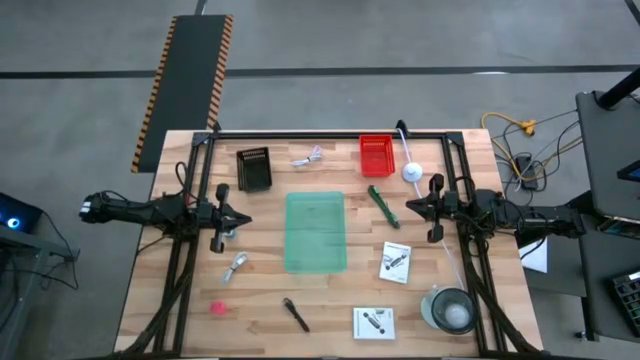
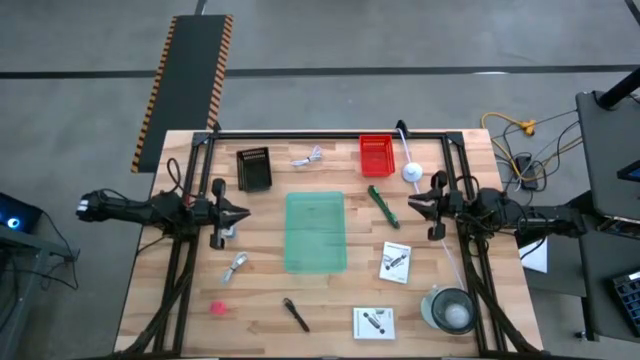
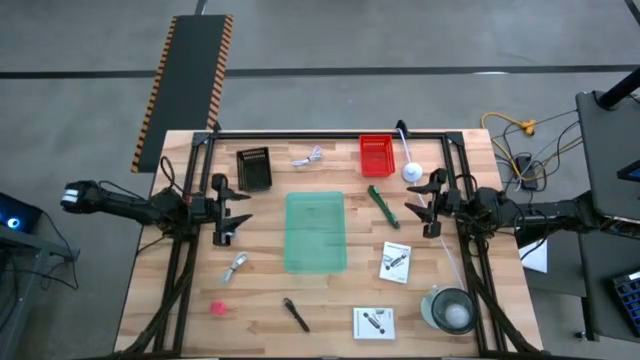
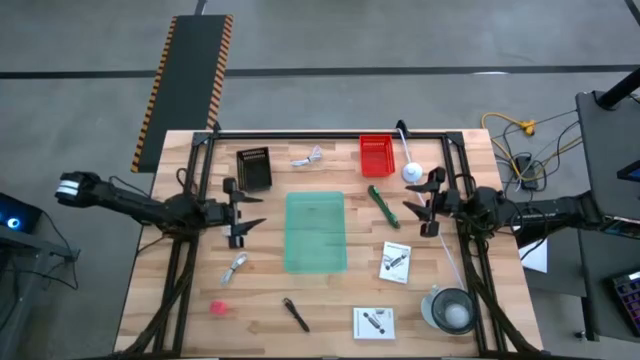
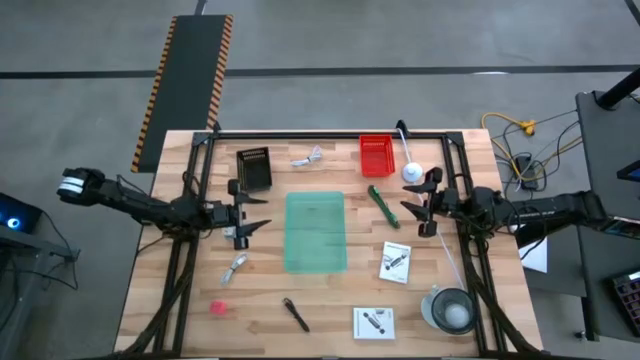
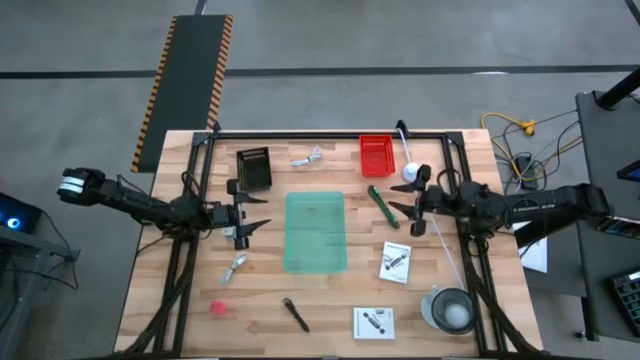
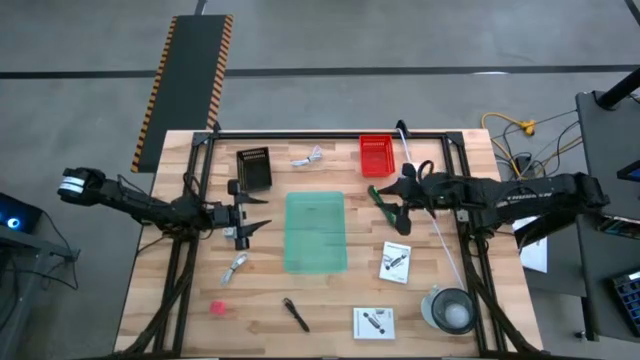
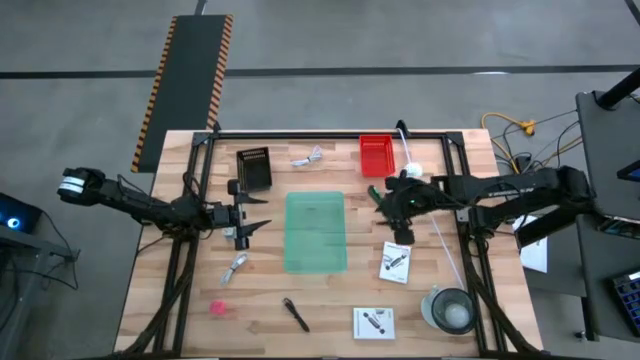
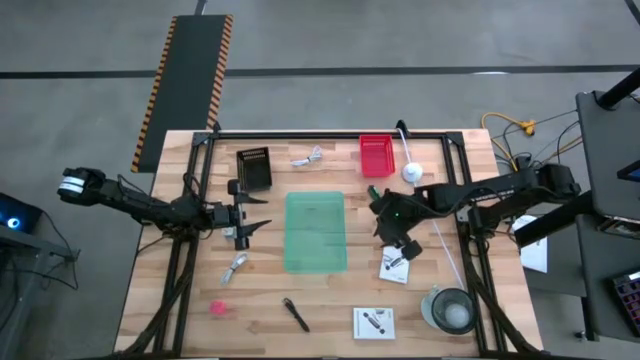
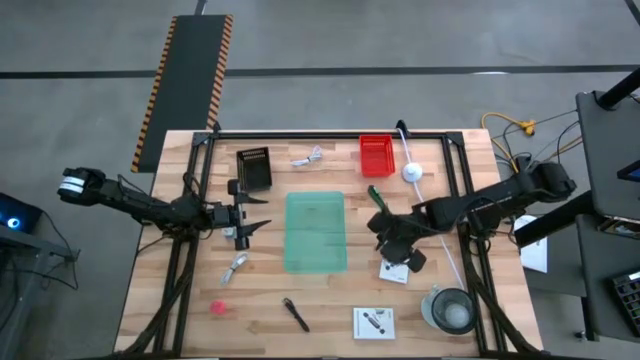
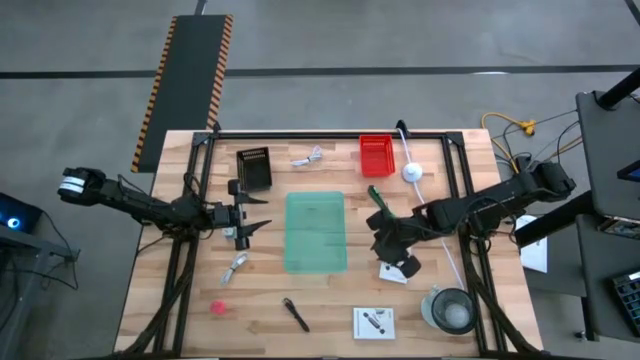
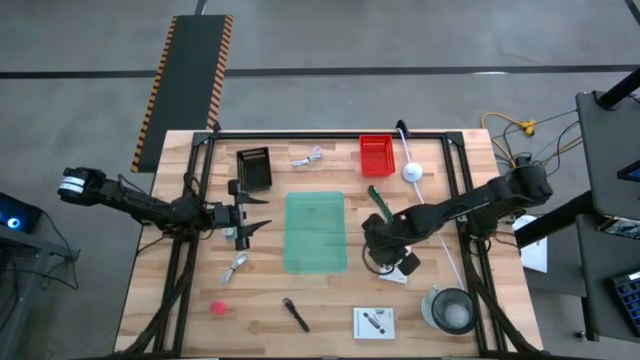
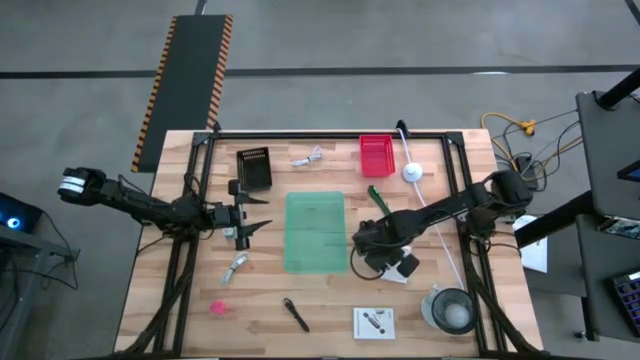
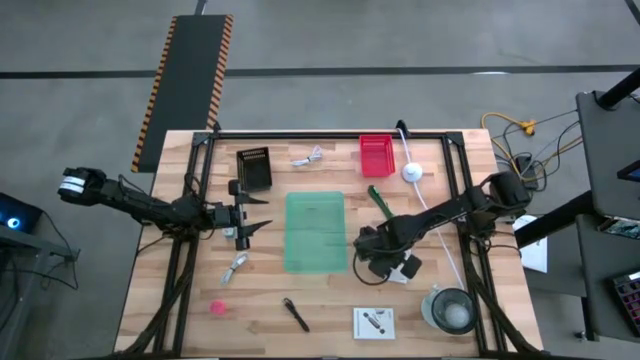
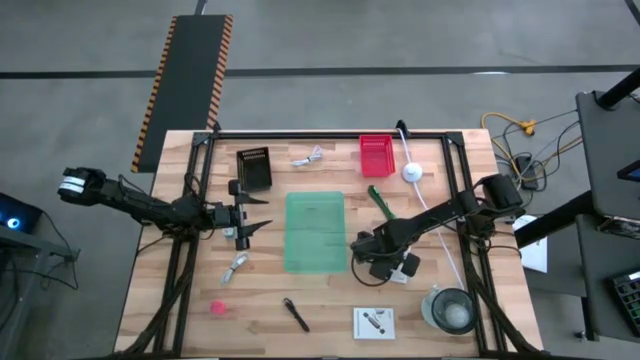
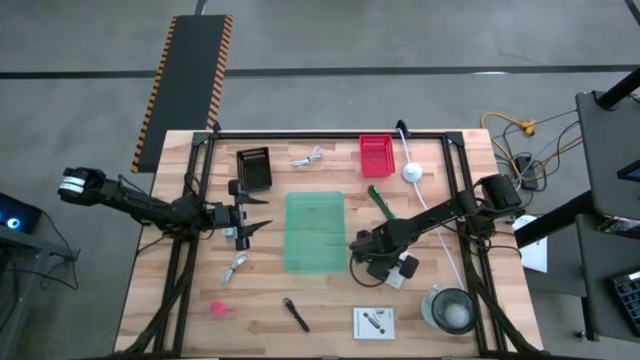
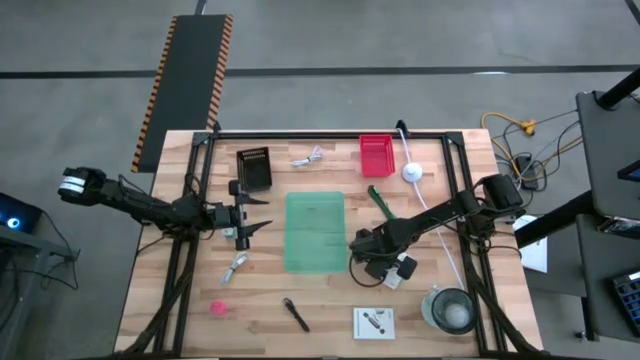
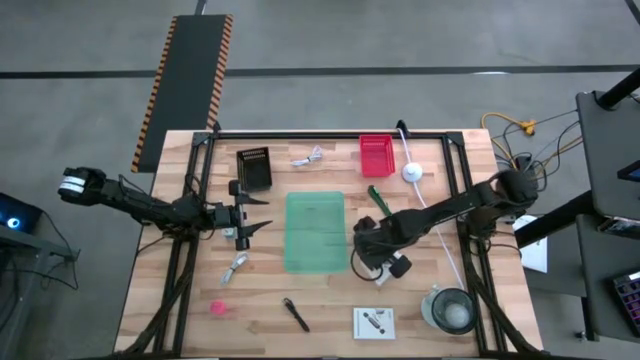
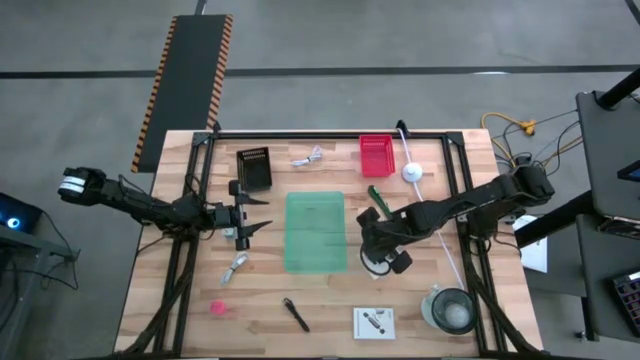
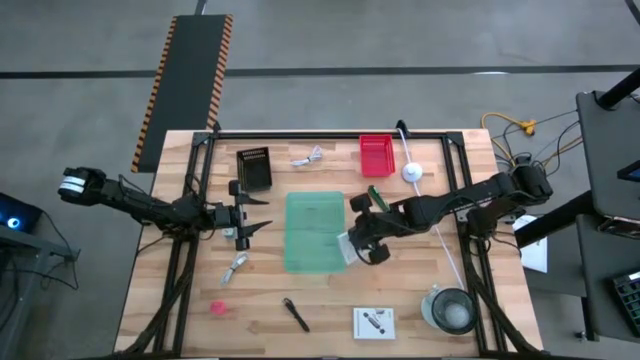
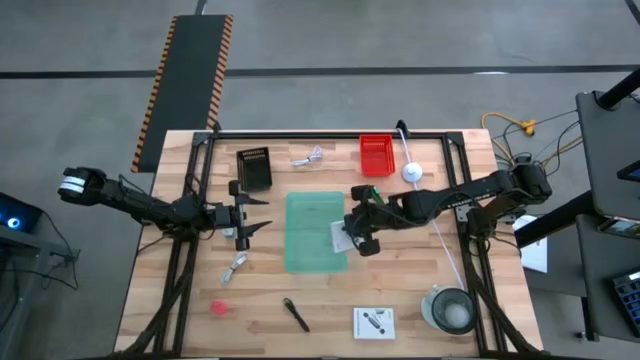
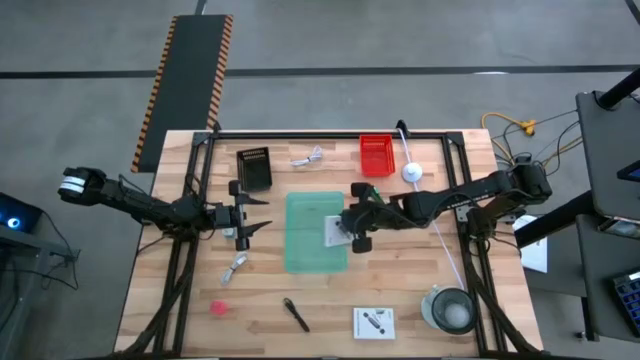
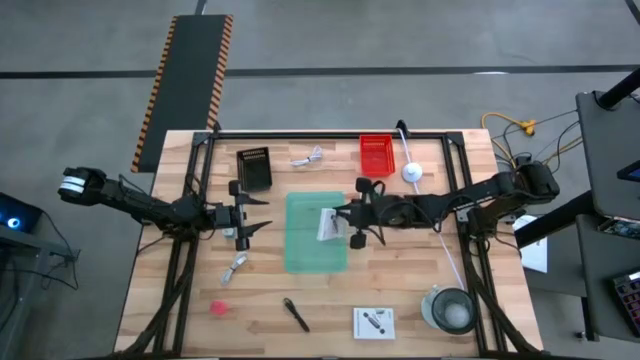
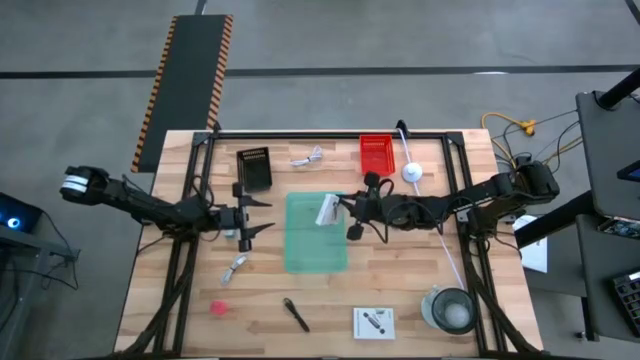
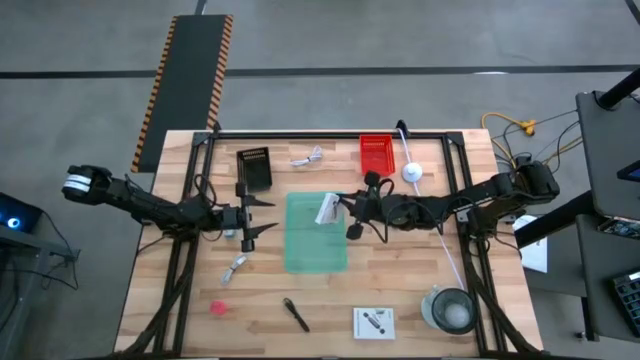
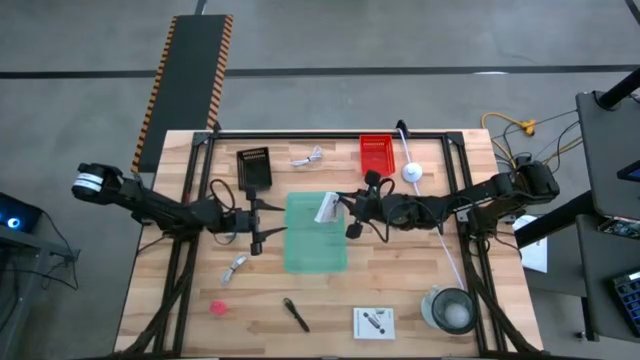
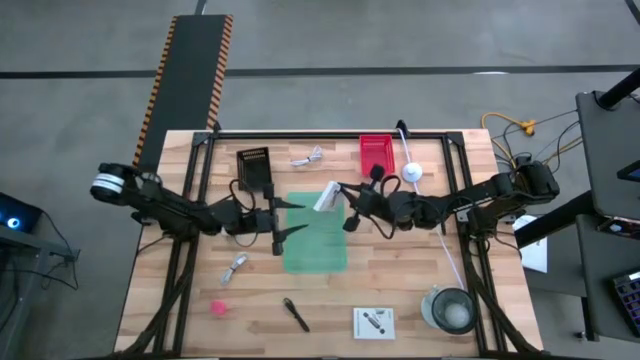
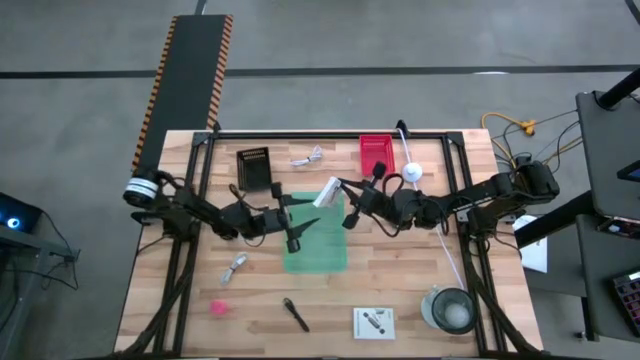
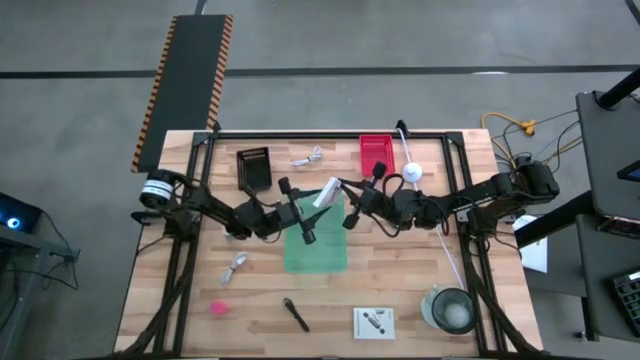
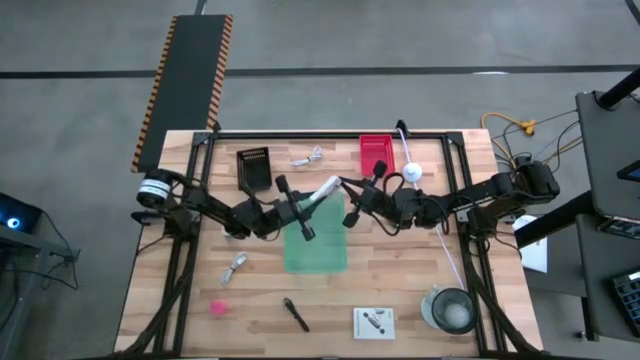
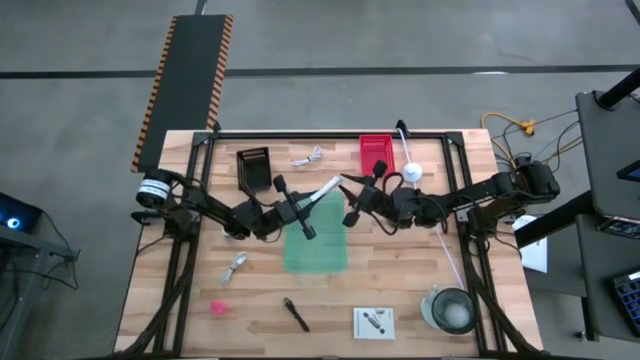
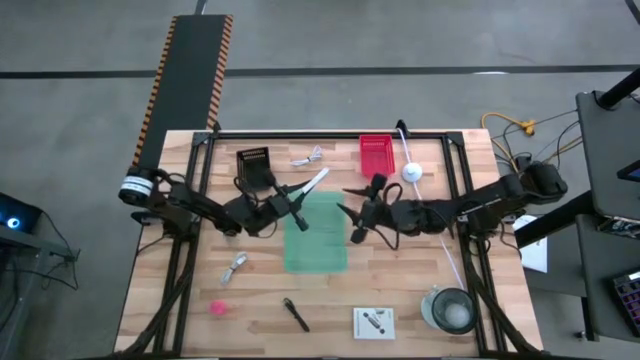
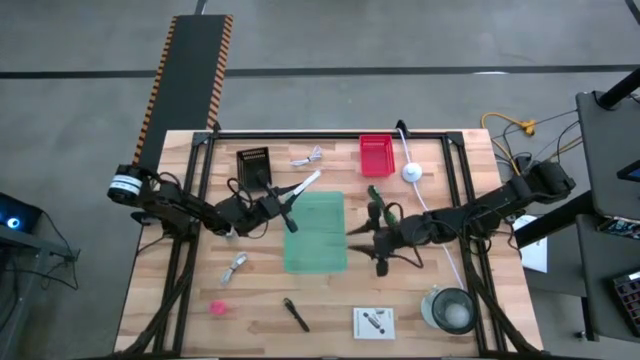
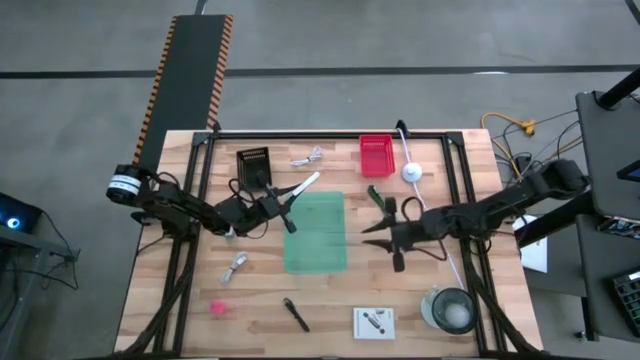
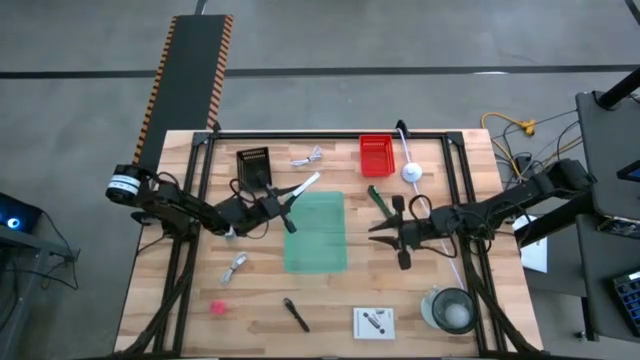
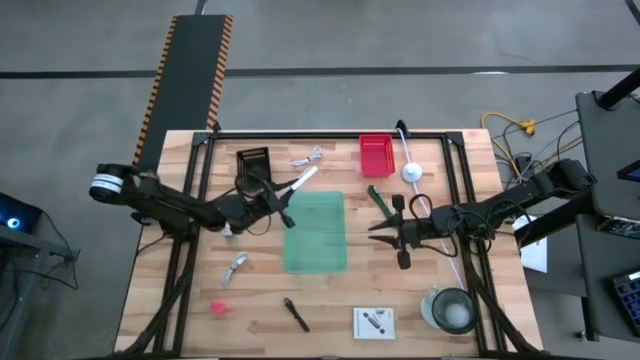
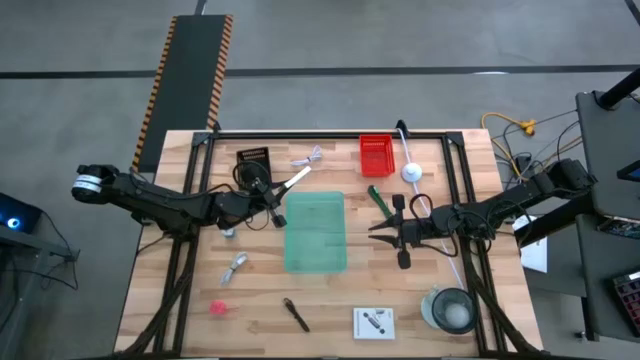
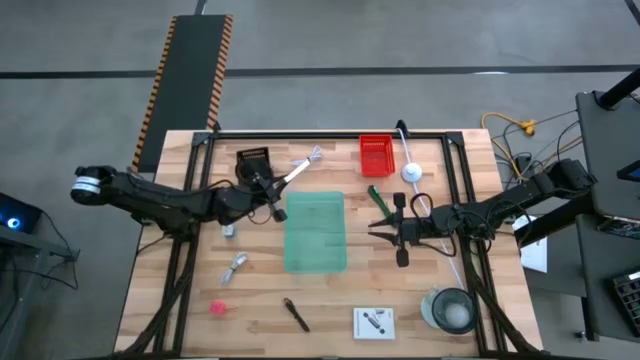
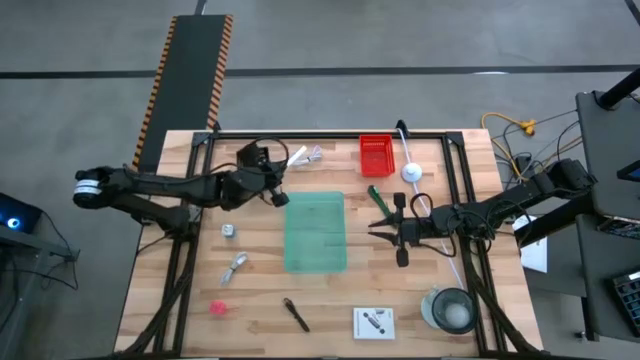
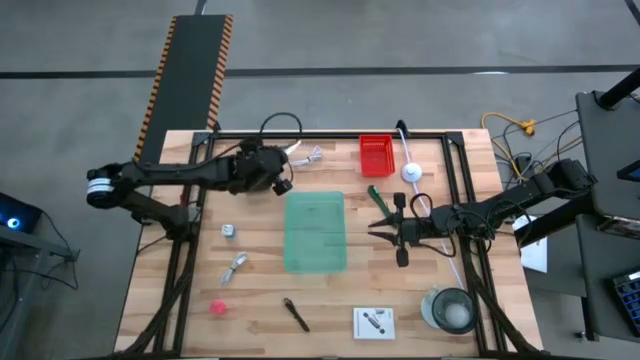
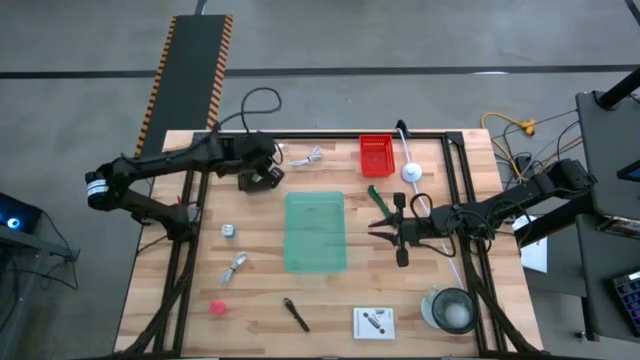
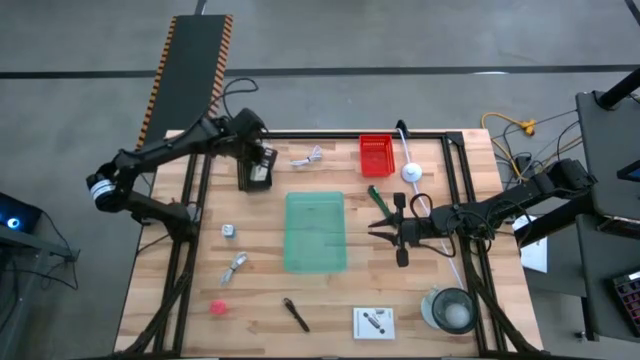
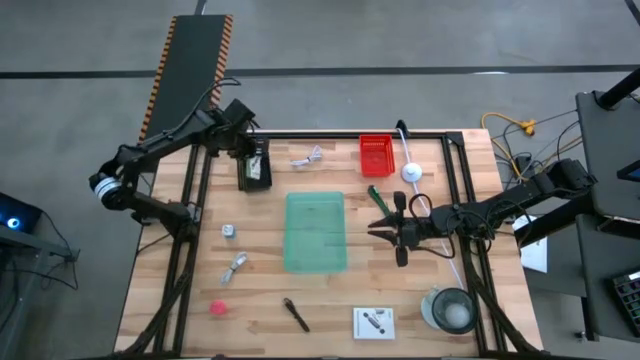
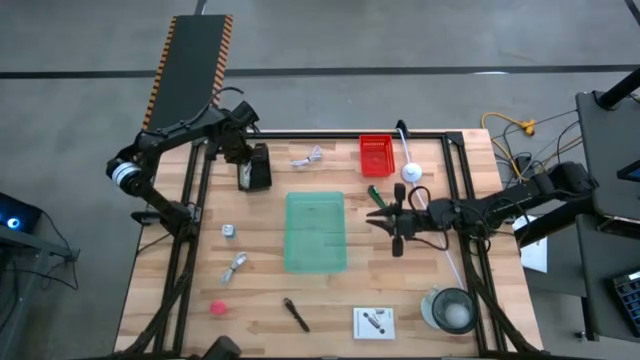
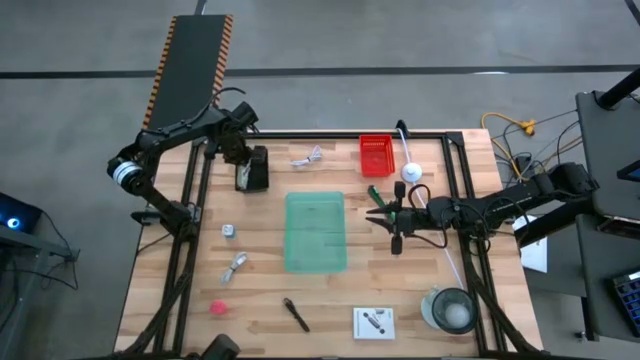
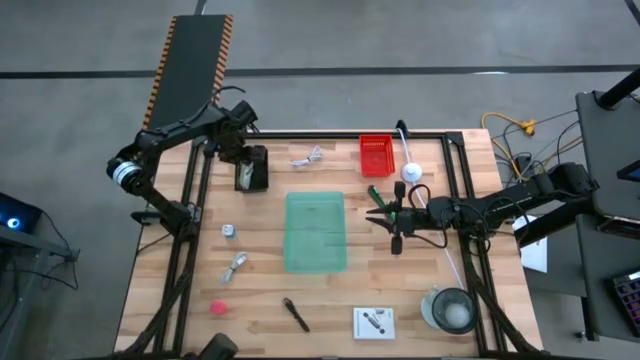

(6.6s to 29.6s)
Task: Pick and place items into bin
Put the top white card reader box into the black bin
